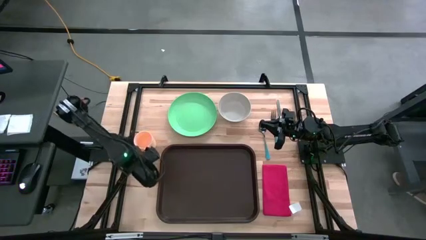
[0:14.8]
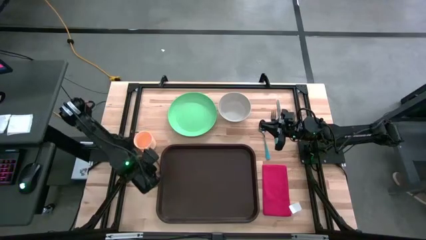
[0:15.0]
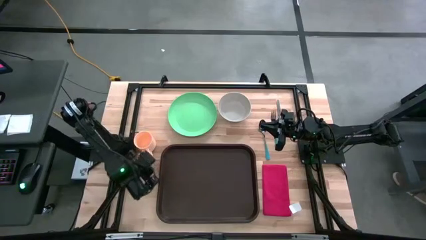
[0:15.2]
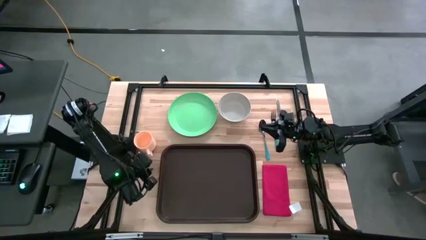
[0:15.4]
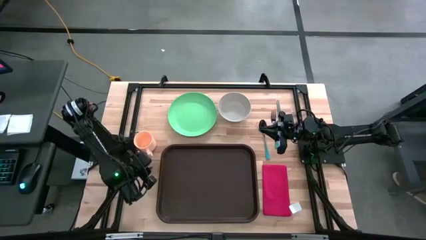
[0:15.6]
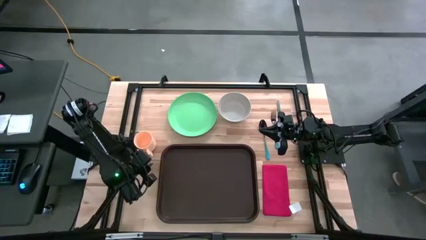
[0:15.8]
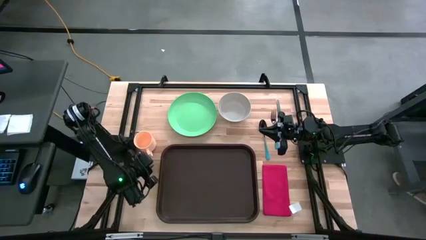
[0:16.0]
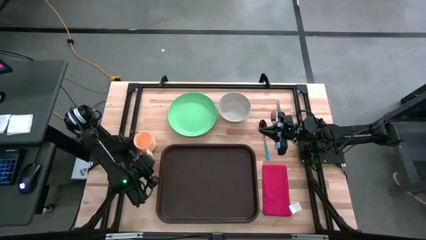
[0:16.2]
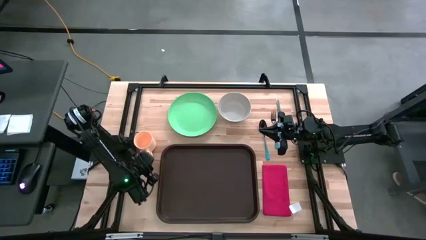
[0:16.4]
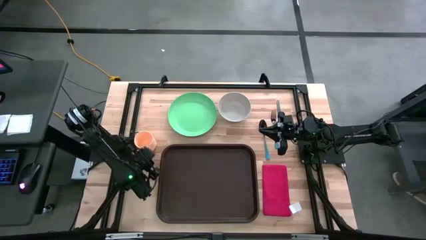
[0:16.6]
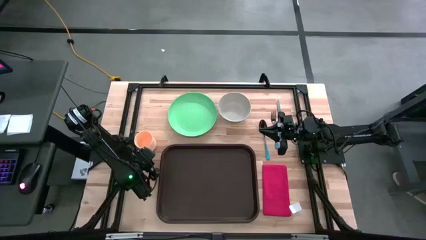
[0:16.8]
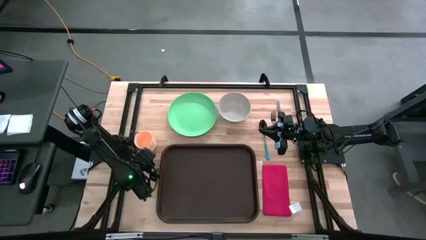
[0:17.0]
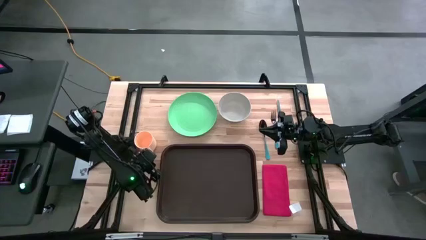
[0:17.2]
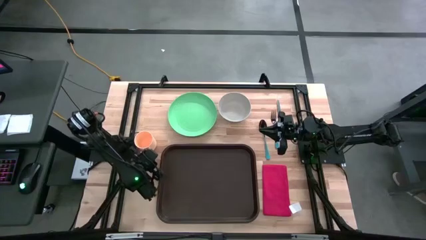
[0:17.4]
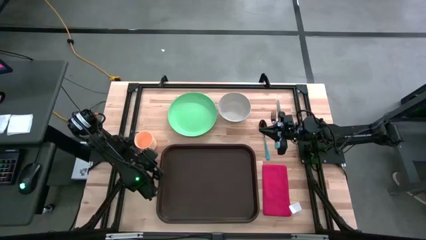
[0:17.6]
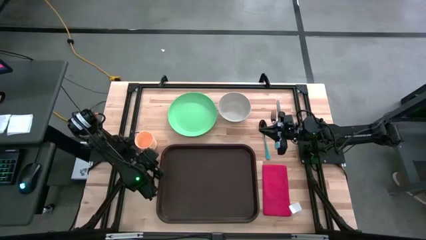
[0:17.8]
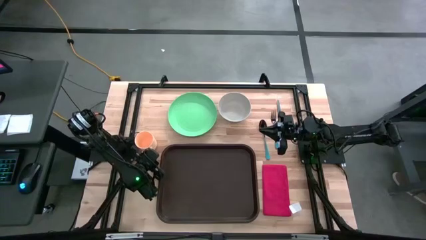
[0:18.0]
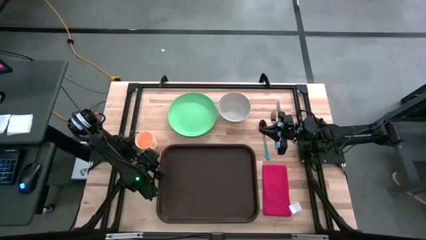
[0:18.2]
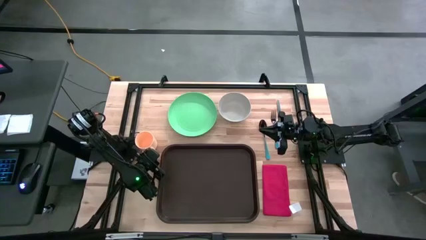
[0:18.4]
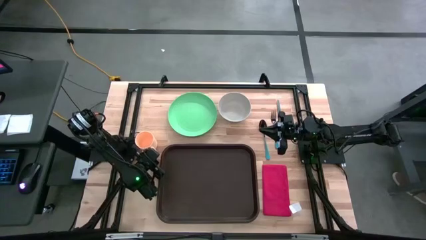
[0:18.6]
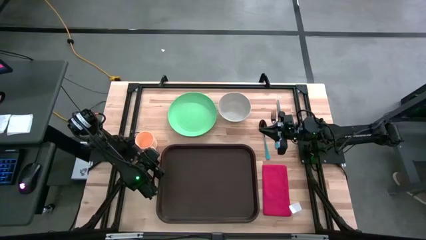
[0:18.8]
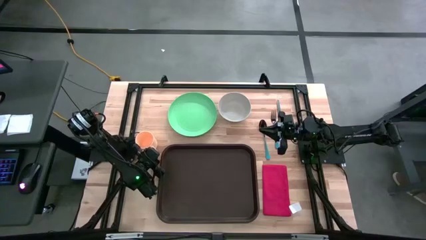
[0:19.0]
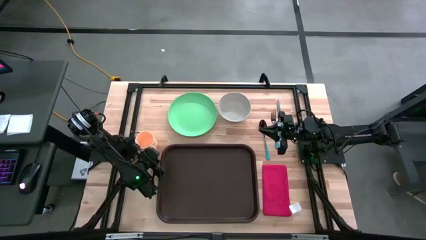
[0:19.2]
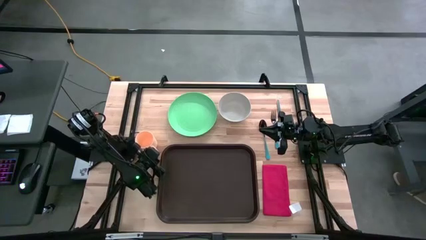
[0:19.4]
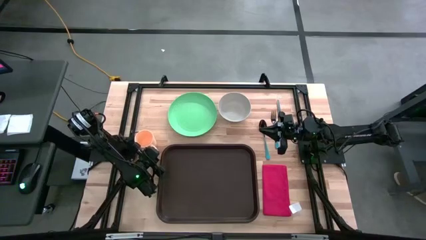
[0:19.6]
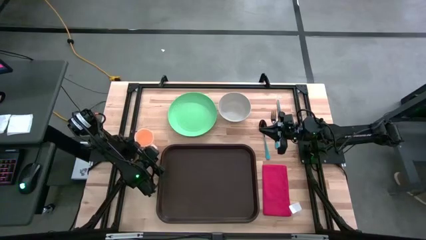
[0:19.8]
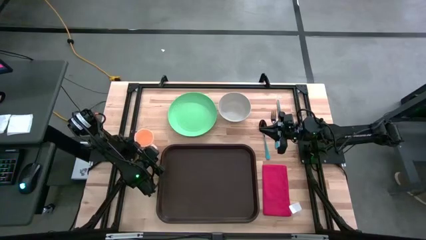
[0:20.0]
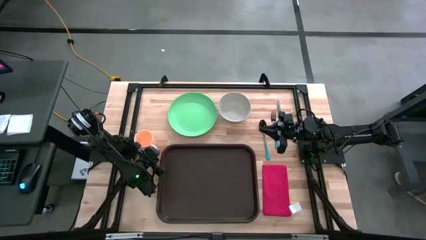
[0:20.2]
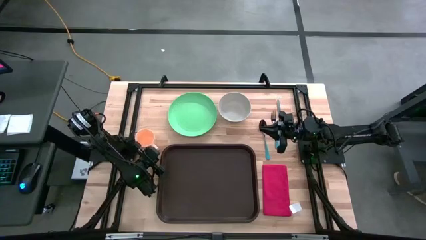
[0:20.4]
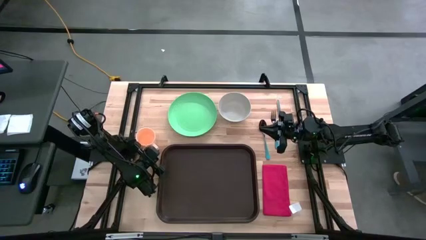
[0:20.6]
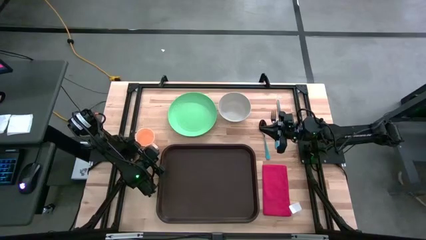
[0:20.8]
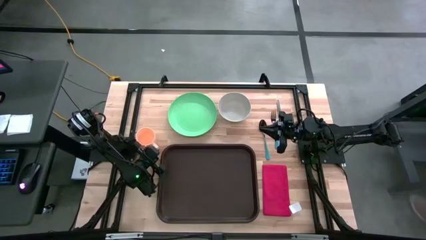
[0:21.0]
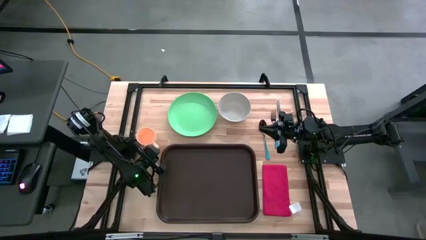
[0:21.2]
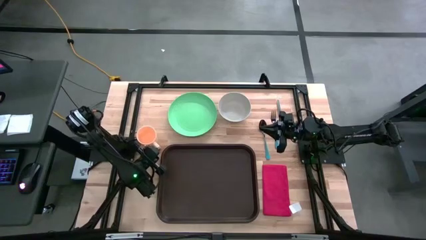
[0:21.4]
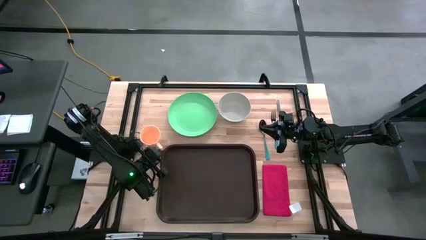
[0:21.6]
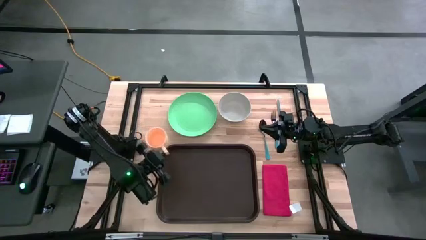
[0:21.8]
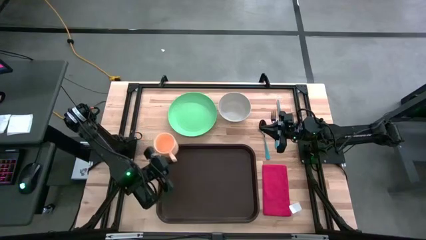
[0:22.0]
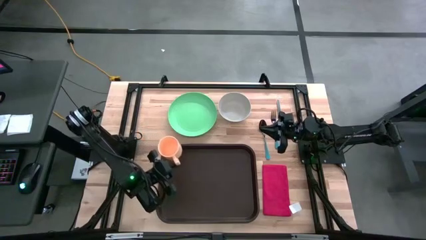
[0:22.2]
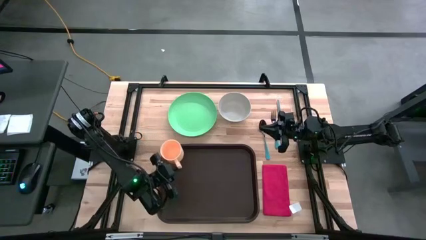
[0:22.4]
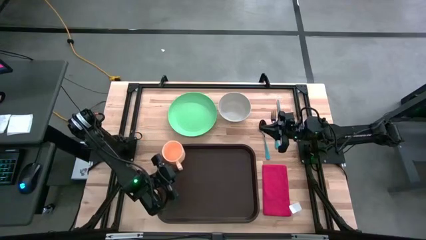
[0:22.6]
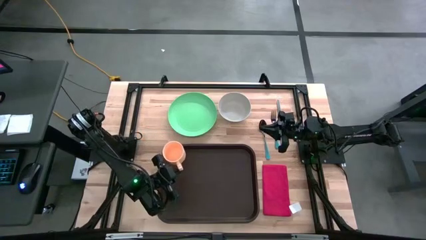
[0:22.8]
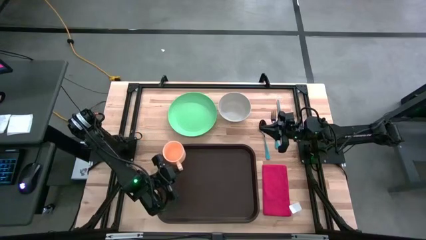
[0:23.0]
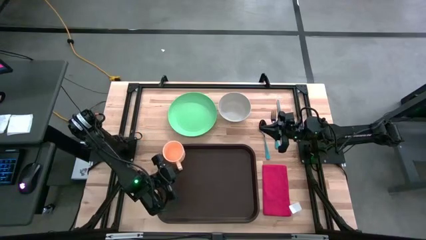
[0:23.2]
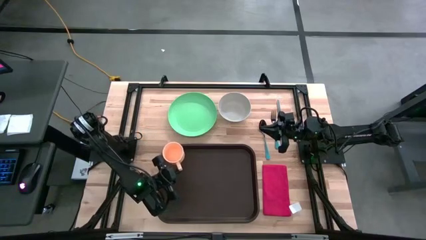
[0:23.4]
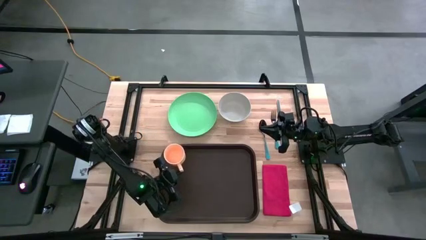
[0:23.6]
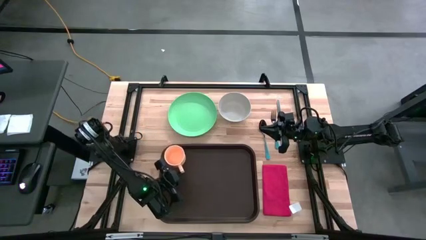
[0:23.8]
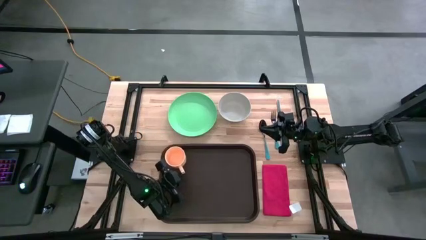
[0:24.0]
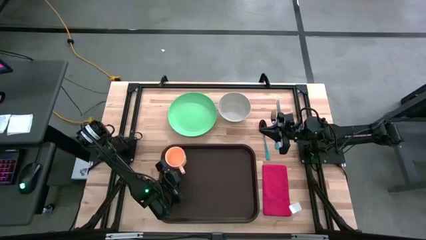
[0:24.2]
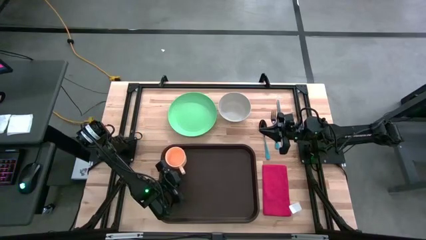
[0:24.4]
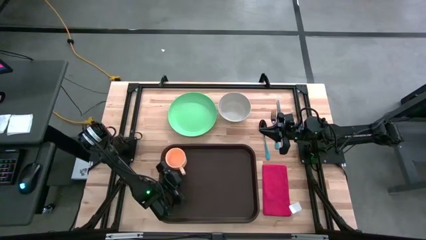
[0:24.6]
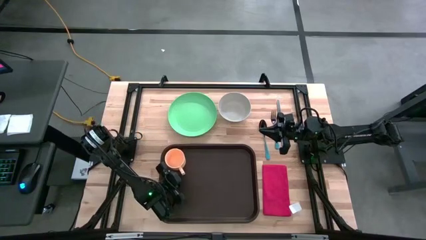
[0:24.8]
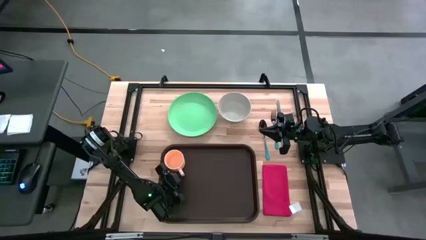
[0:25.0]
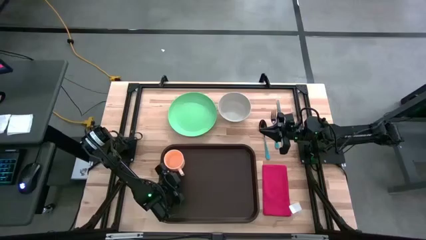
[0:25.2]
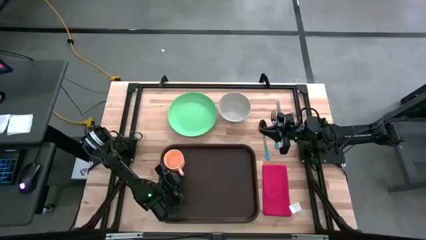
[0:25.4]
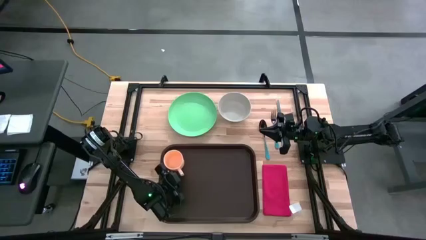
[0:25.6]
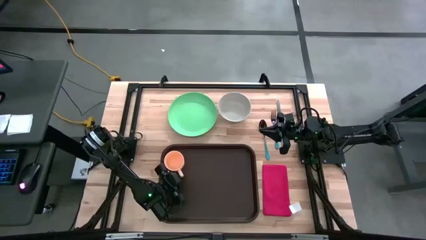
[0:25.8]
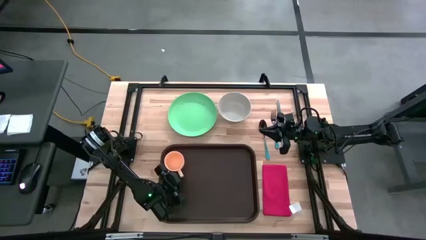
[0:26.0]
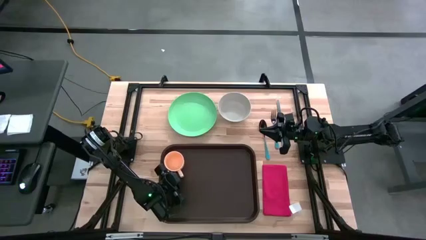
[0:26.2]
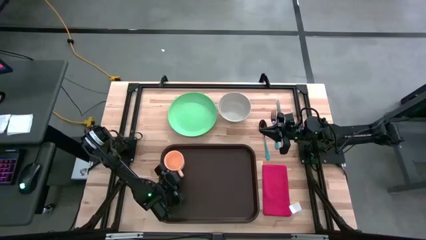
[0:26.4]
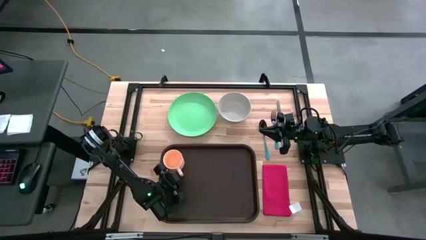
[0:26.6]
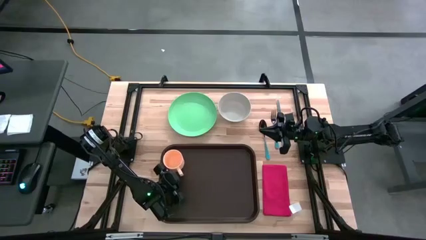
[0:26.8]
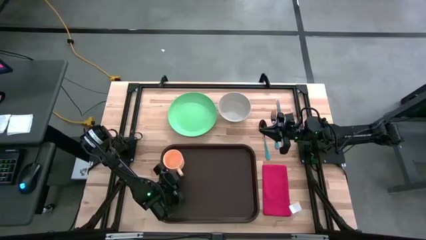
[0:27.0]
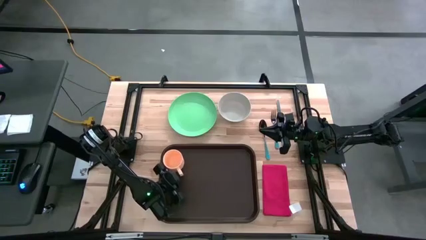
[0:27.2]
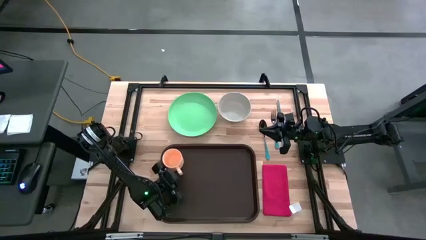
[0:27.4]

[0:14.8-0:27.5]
Task: Set up tray
Put the orange mug on the black serving tray

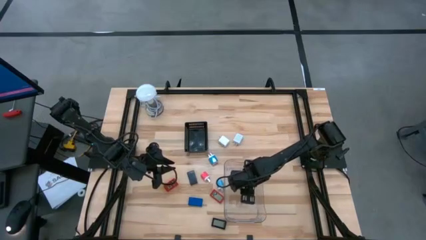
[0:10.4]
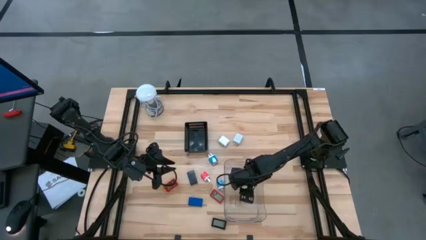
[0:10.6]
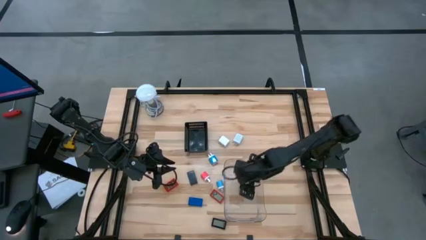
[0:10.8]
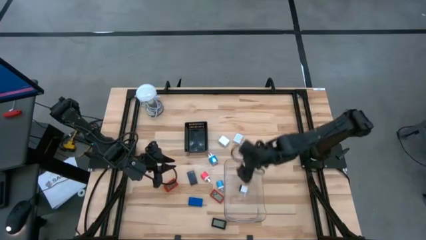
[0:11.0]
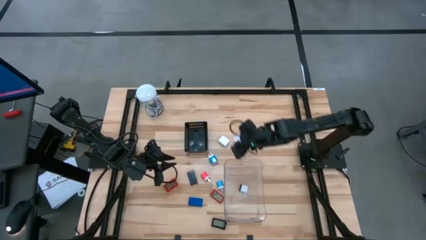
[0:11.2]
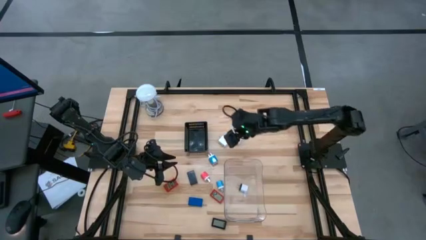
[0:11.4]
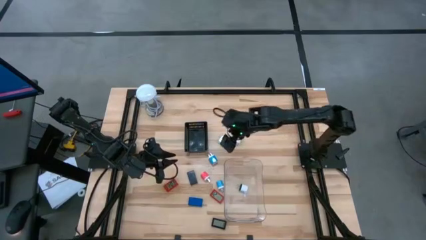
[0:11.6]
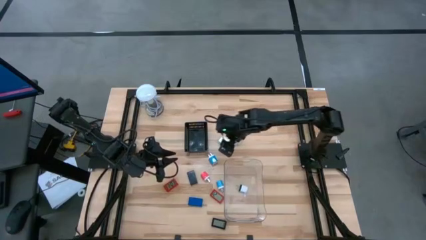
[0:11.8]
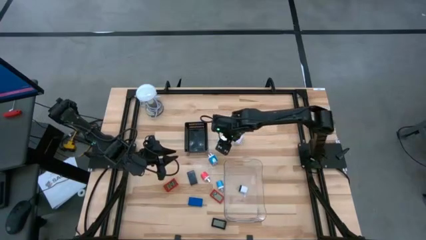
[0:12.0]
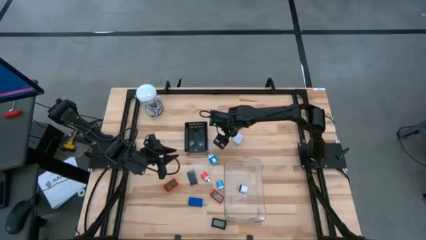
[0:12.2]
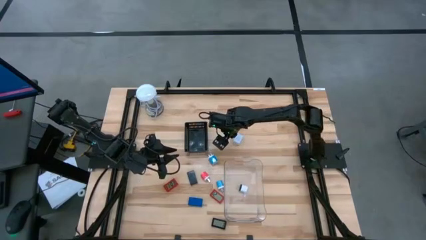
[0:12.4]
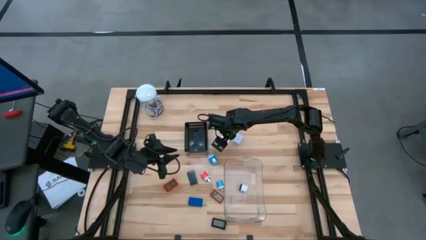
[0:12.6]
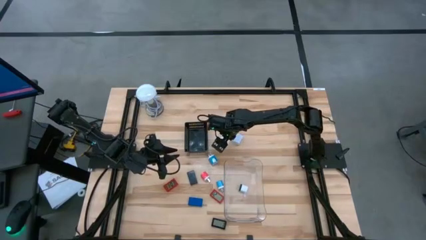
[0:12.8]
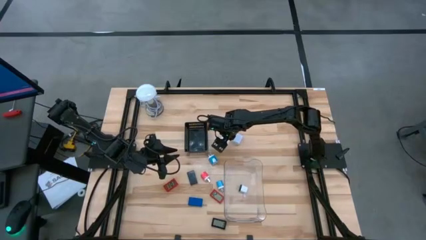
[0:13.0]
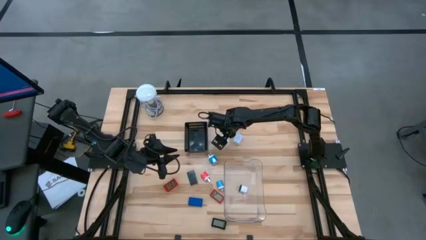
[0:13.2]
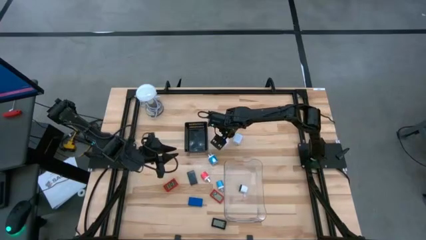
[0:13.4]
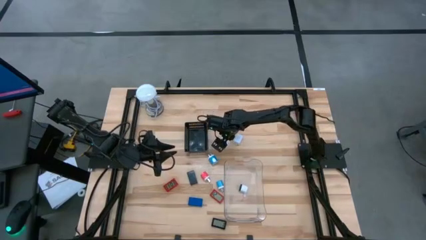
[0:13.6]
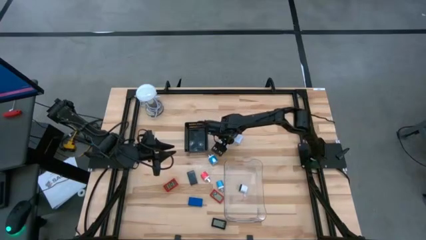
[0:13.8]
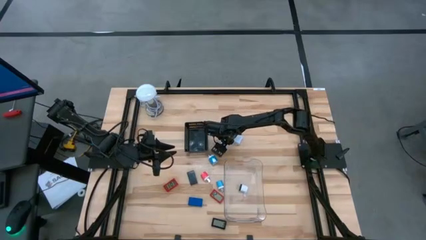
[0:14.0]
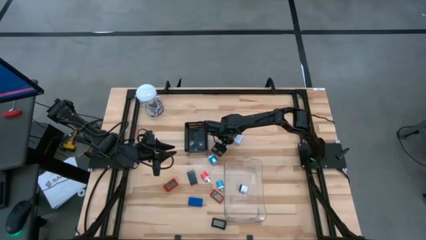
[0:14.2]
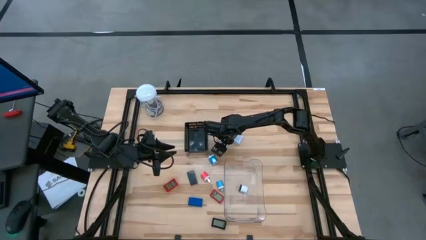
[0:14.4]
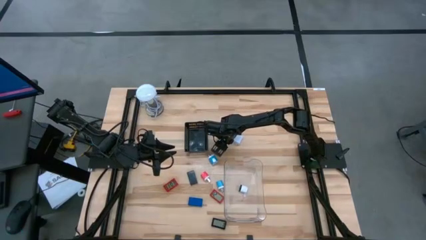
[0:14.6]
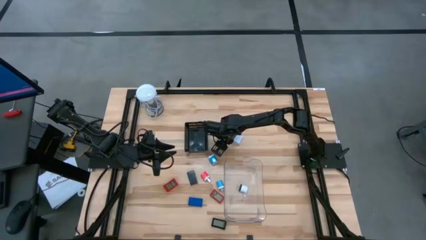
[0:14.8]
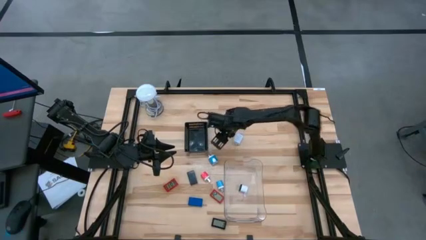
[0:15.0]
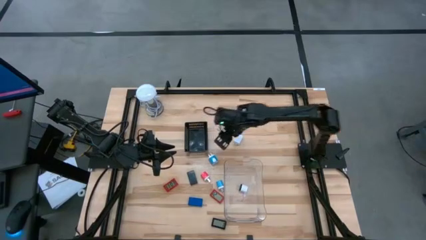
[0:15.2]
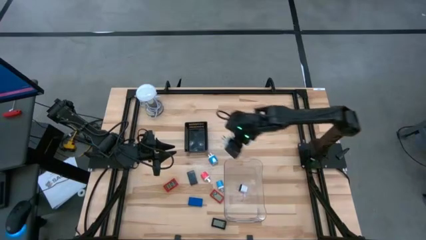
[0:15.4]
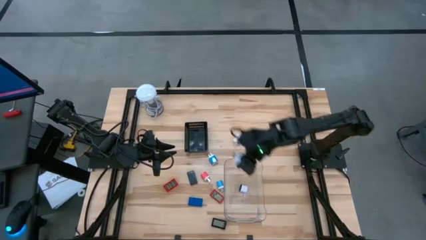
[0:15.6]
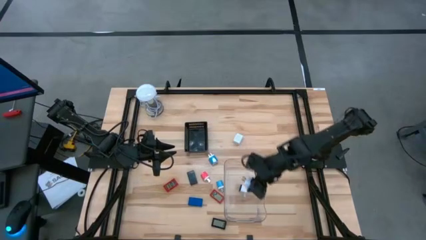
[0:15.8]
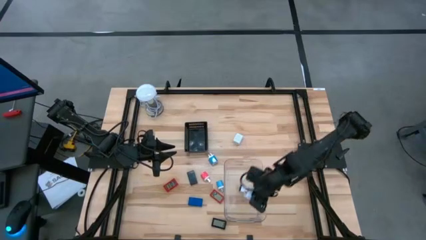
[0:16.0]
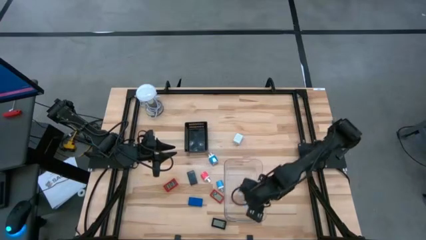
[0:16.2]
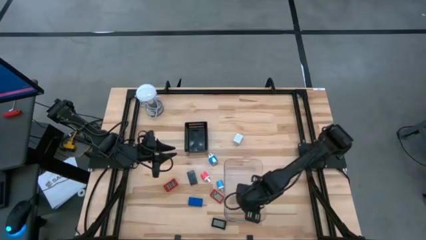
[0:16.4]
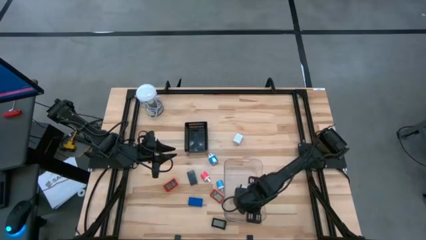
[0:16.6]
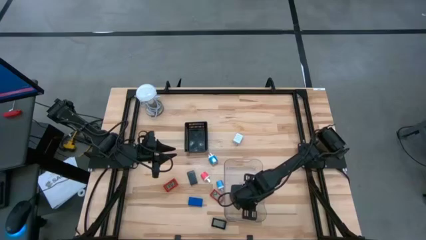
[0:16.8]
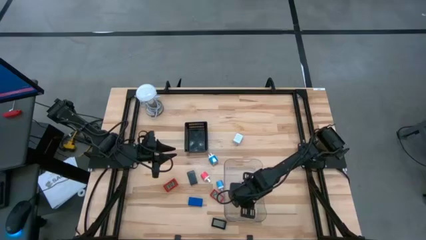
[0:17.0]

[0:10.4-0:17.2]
Task: Pick & Place Office items
Put the left white charger adapter into the transparent bin
